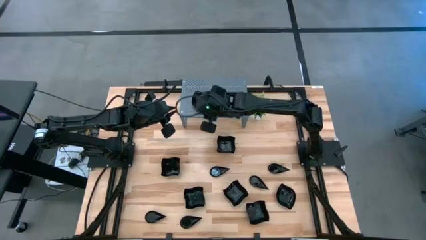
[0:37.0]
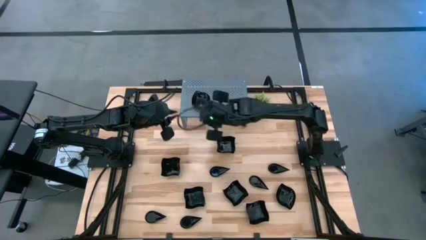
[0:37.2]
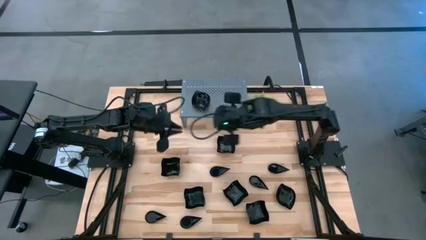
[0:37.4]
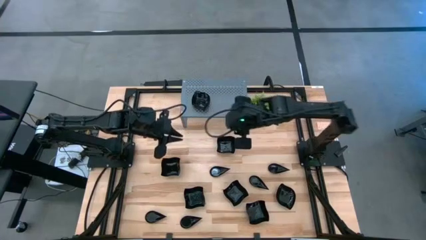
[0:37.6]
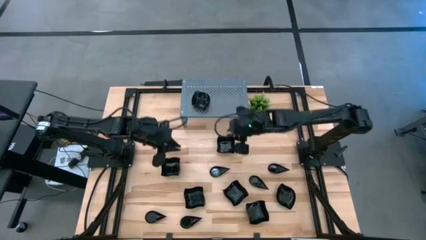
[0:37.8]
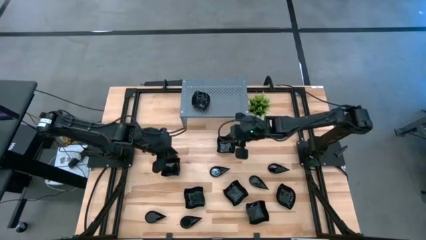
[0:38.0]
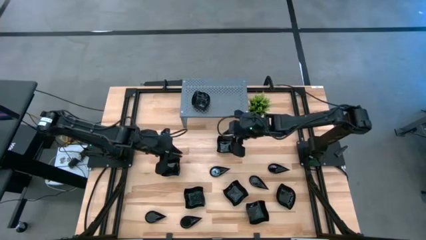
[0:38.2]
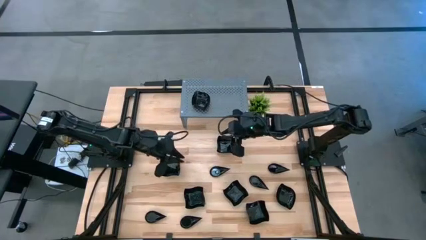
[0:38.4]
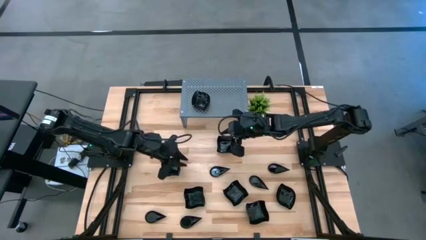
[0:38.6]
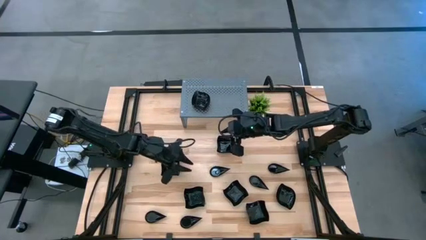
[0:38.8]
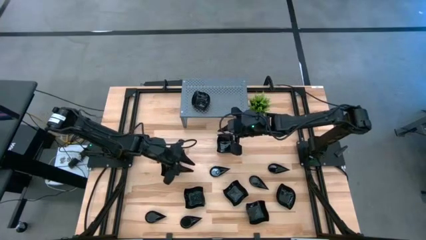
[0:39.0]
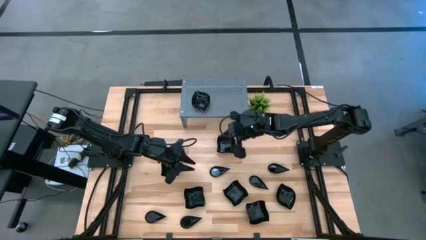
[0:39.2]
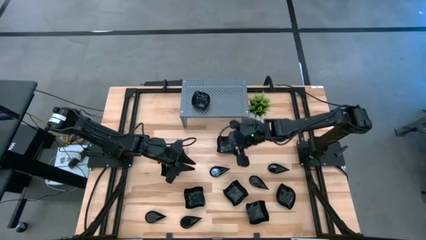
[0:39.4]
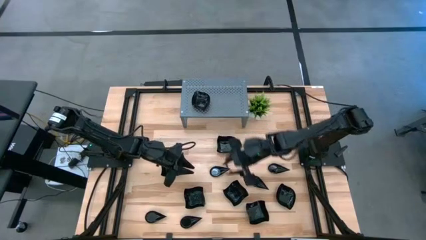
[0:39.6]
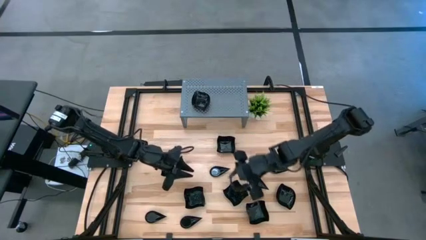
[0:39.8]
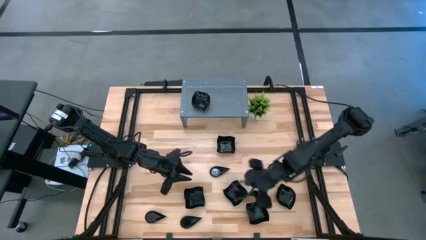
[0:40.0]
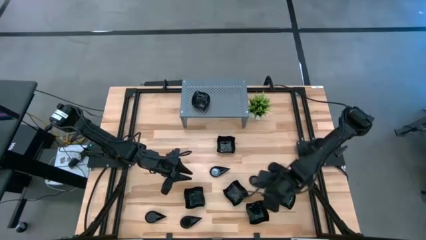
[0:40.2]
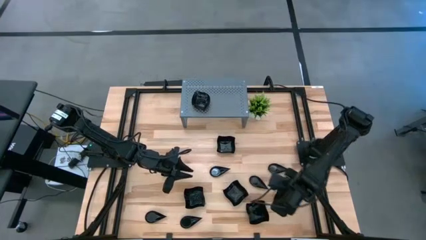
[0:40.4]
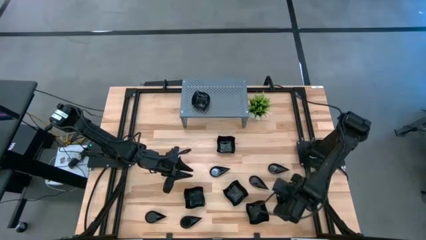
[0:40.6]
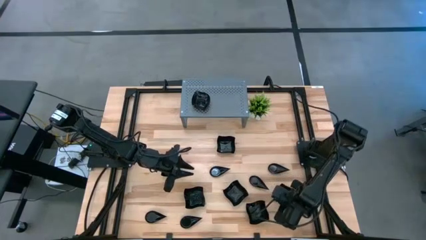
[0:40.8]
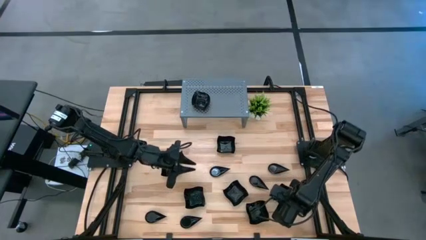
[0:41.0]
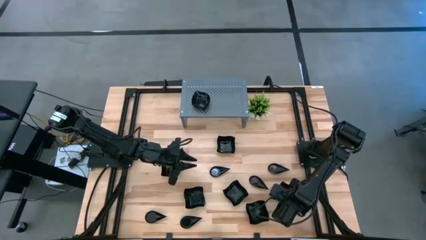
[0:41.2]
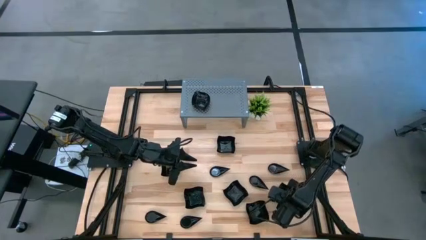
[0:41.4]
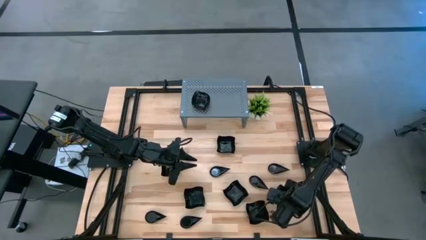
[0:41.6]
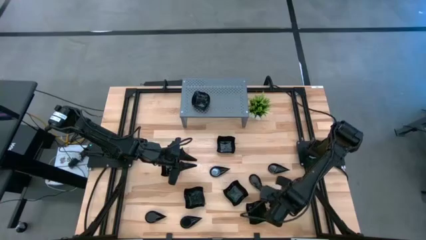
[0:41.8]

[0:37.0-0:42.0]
Task: Pick & Place Mini shaped plates
Stack the black leaf-shaped plate on top of the stacked black leaf-shaped plates on the shelf

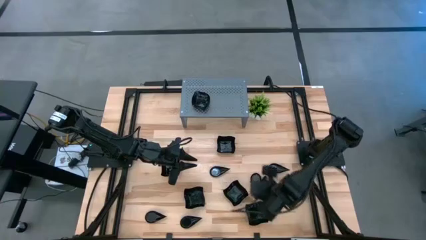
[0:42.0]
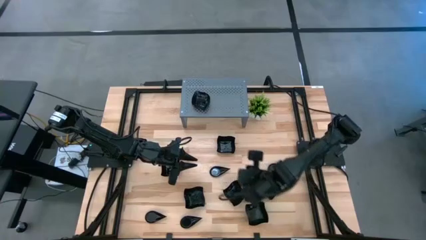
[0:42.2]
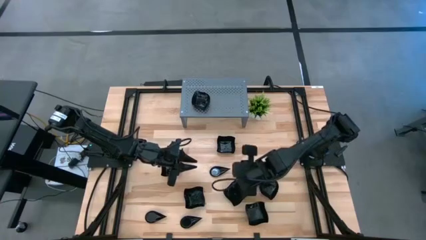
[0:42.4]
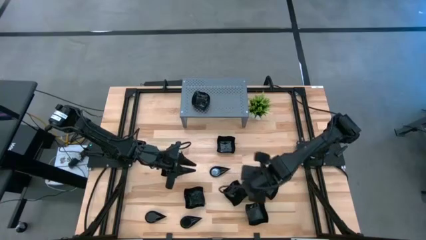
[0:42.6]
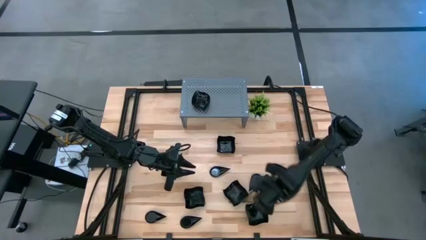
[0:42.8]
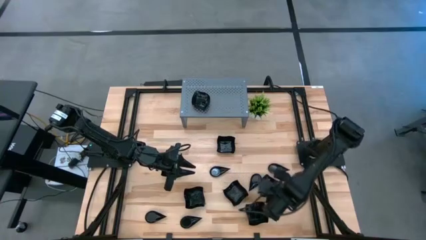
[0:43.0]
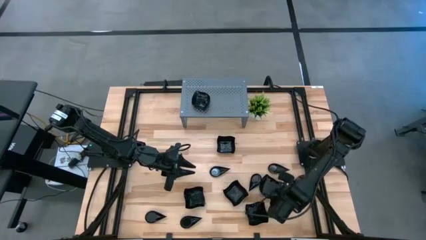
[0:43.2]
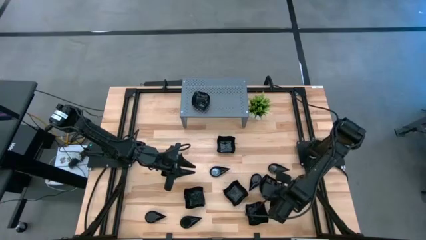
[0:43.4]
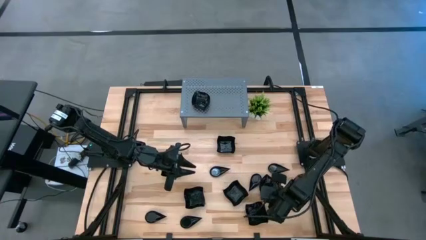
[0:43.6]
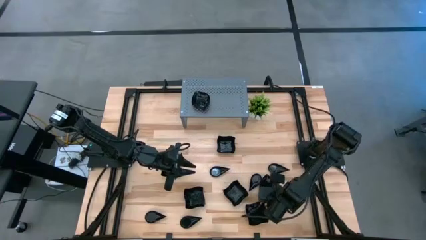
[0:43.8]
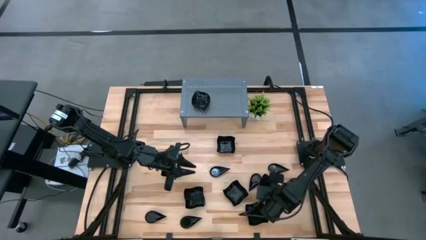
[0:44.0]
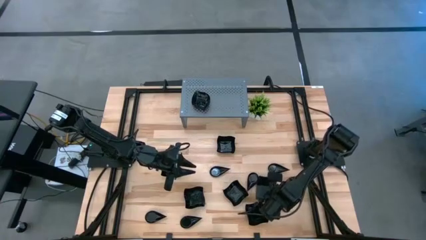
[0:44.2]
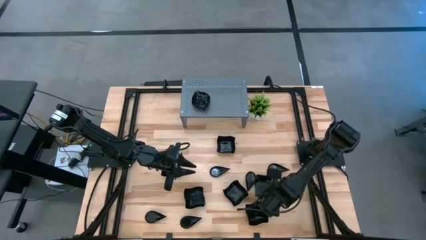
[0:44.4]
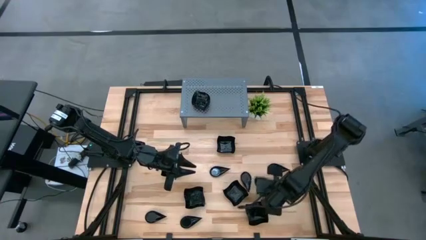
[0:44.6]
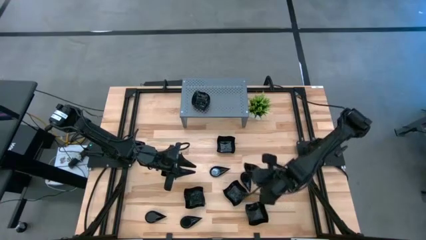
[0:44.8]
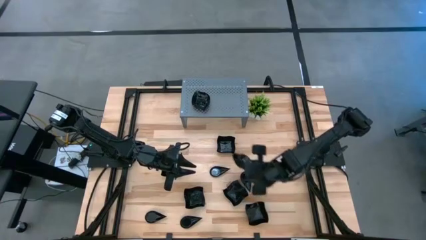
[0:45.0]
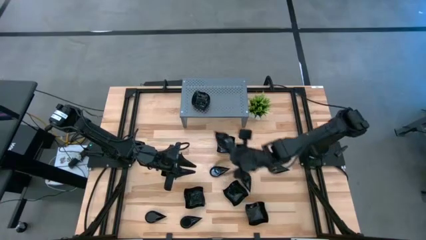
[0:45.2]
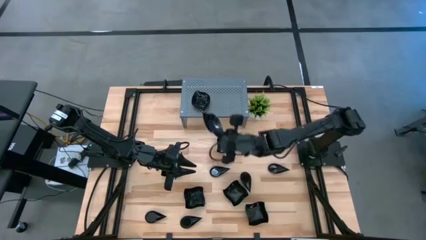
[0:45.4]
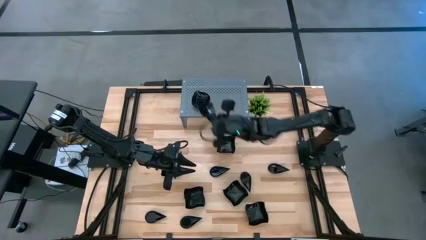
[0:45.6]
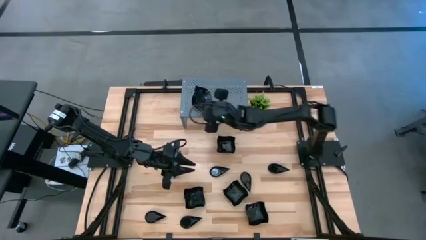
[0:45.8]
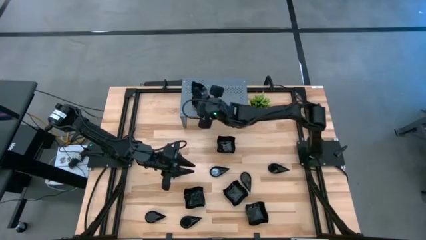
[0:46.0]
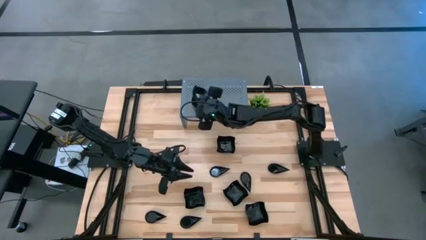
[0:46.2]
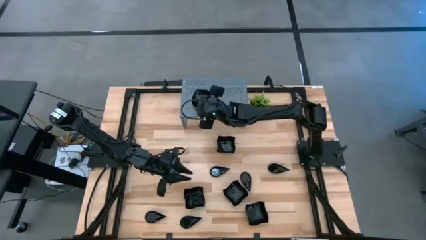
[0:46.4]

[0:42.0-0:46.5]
Stack the black leaf-shaped plate on top of the stacked black leaf-shaped plates on the shelf

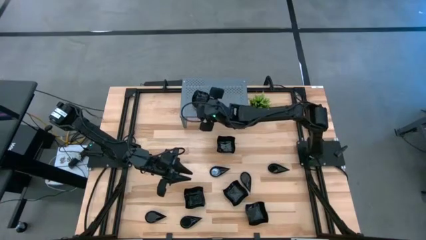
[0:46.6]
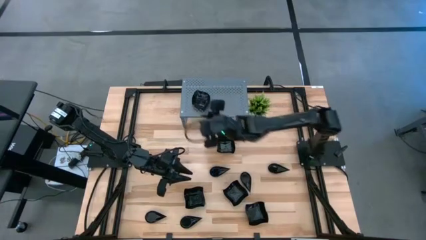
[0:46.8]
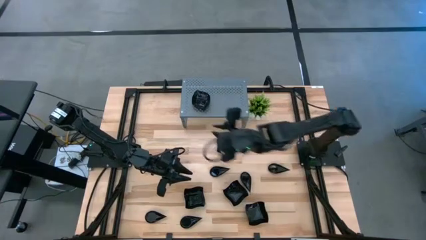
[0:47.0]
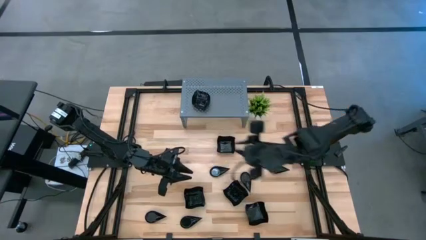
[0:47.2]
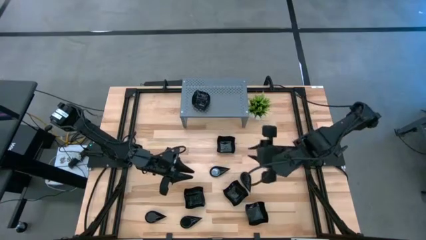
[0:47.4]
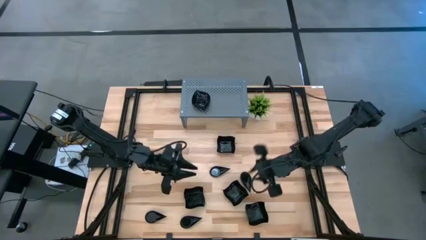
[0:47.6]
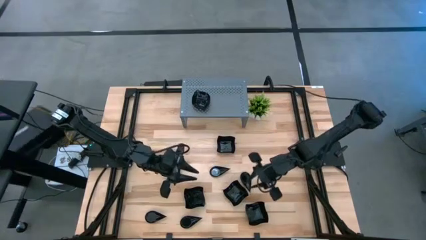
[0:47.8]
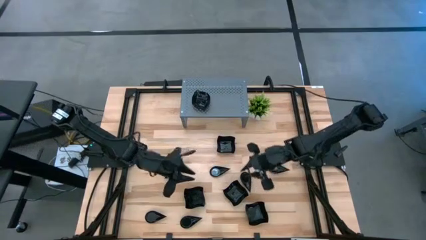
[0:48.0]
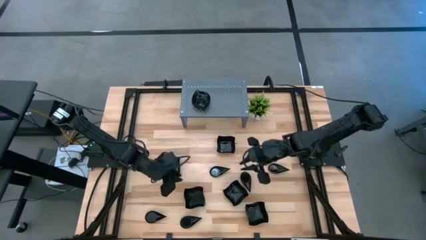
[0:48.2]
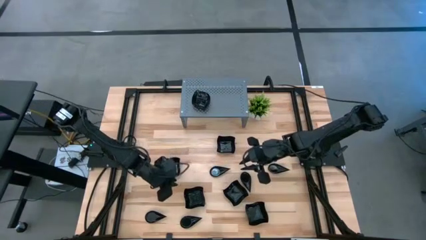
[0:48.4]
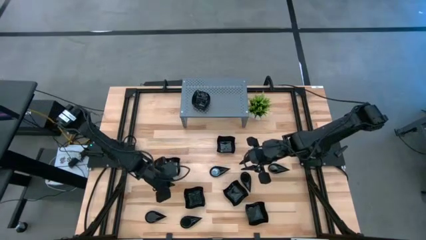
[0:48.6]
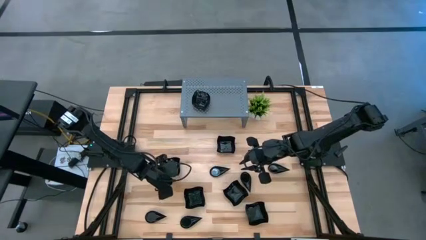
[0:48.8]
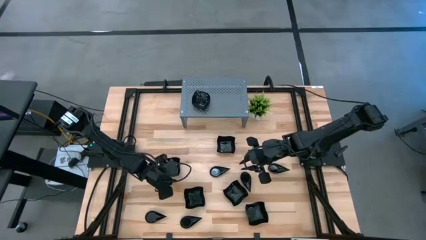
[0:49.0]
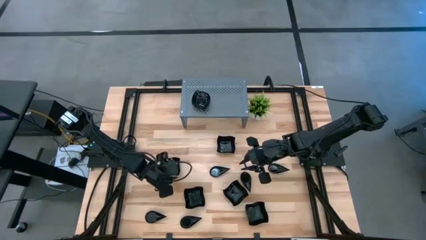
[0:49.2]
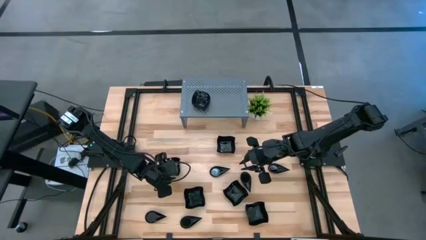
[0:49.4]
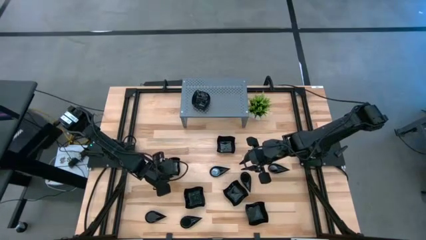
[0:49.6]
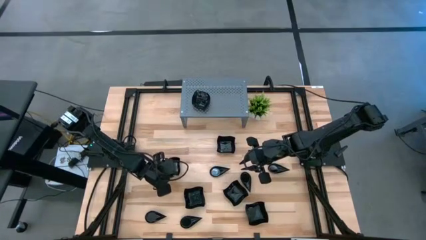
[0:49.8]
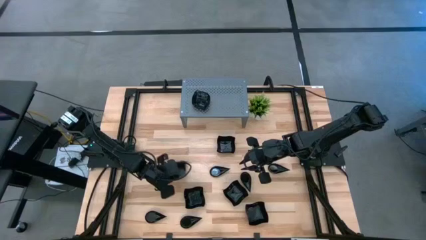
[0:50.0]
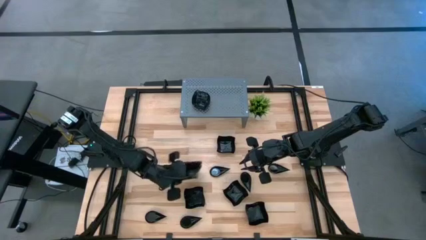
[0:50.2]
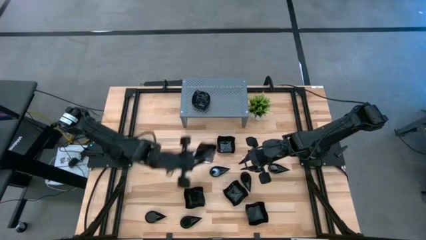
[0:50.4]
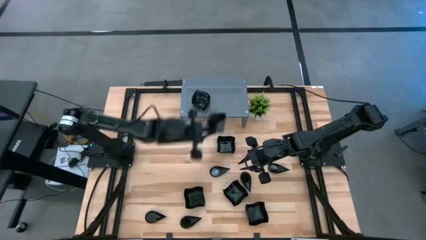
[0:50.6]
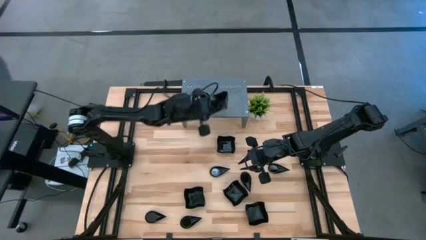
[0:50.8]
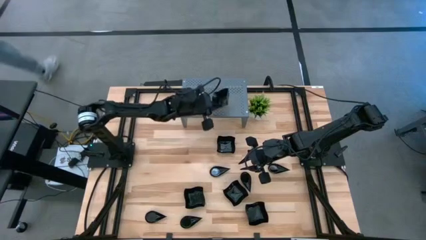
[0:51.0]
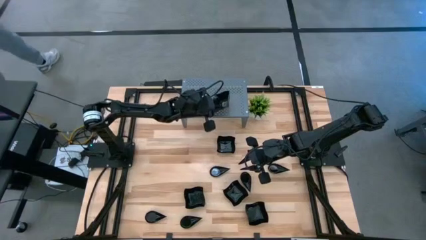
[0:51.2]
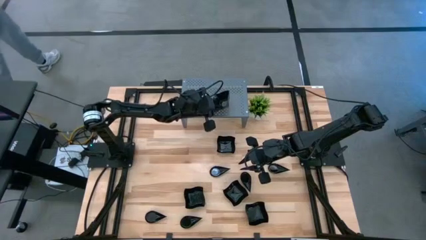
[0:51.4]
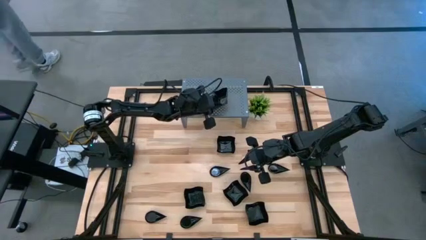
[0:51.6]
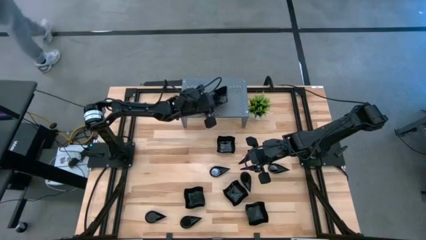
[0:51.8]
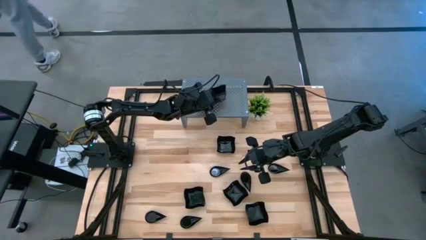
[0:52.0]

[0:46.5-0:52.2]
Put the black distorted square plate on the shelf

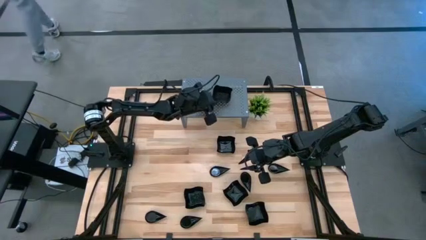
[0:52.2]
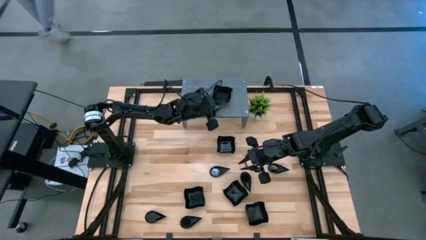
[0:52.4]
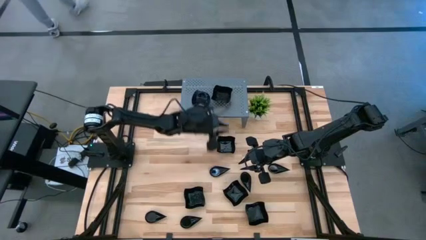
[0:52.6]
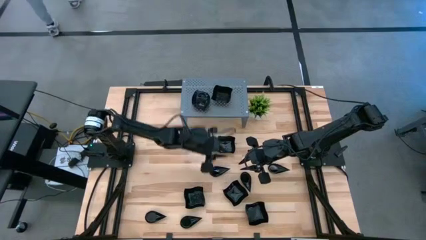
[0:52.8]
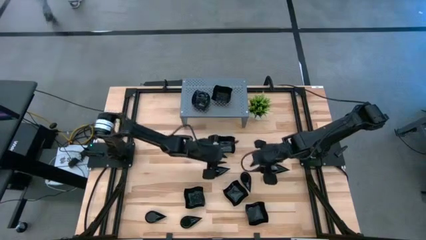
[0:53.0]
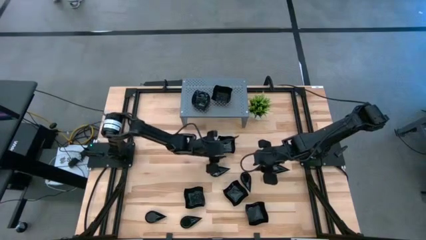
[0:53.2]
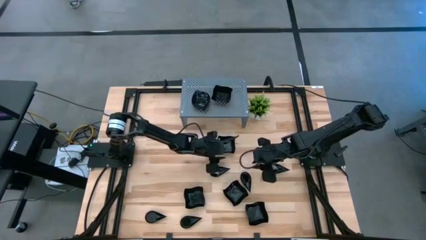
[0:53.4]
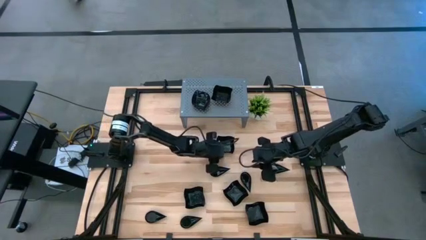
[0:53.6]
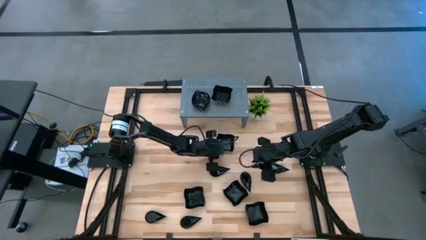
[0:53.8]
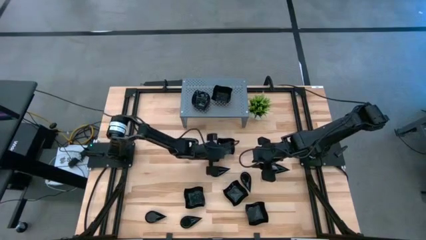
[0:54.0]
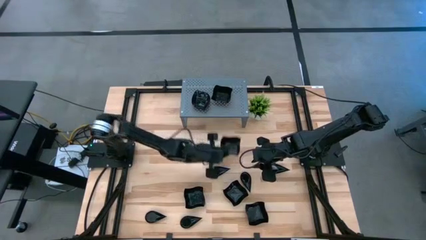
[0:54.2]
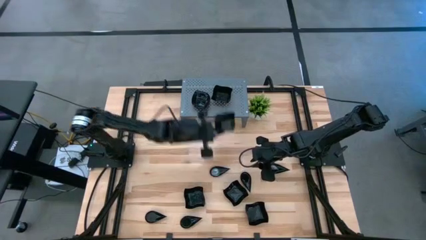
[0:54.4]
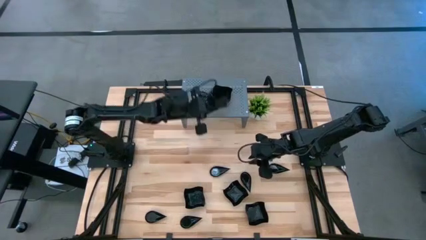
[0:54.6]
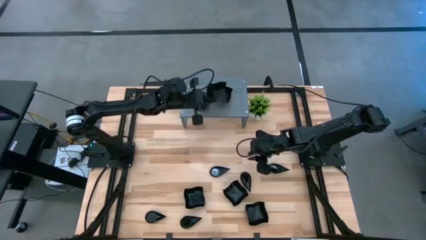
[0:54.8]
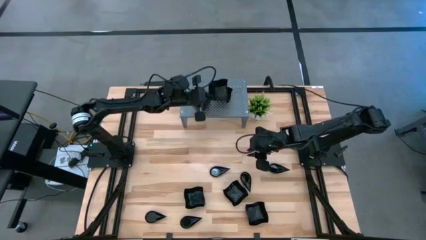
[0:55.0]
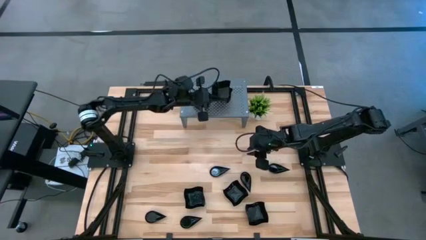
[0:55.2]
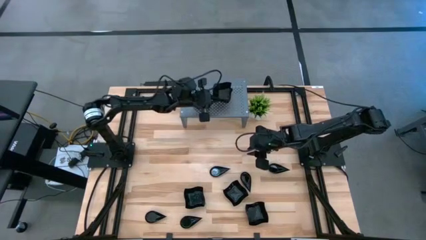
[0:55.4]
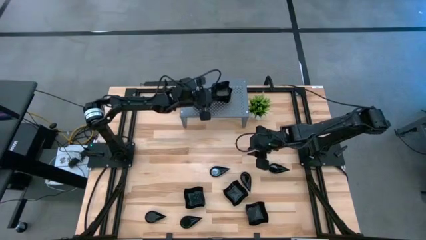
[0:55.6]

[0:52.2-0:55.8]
Stack the black distorted square plate on top of the black distorted square plate on the shelf
